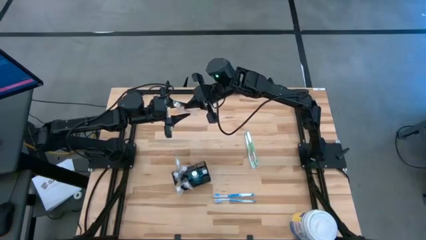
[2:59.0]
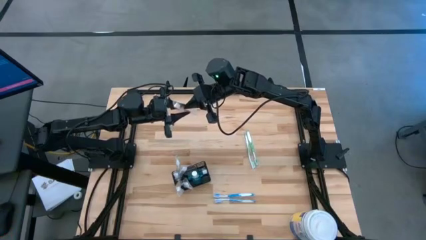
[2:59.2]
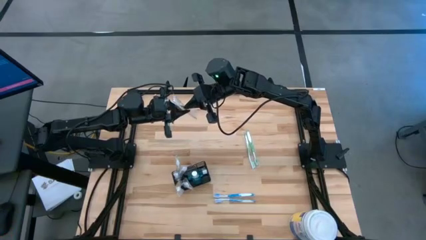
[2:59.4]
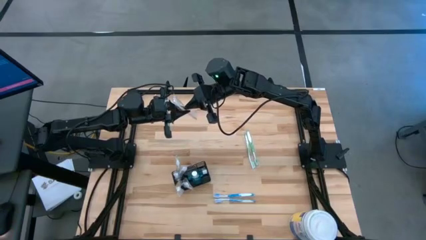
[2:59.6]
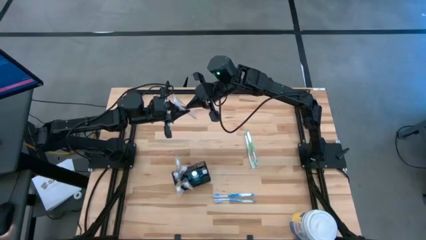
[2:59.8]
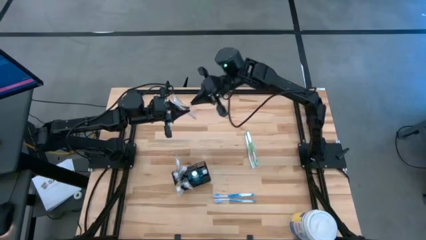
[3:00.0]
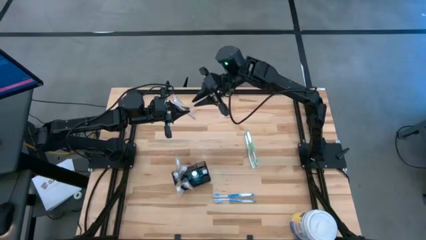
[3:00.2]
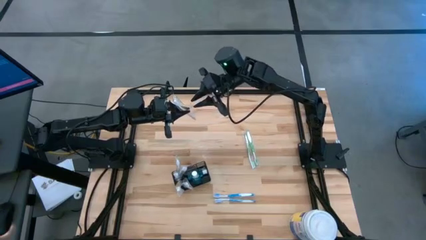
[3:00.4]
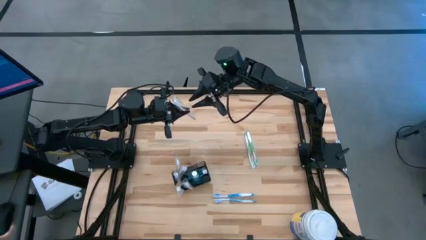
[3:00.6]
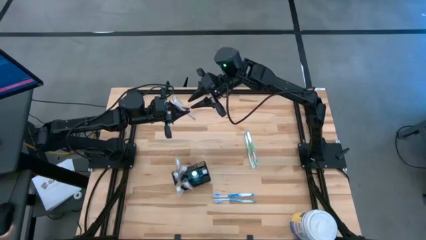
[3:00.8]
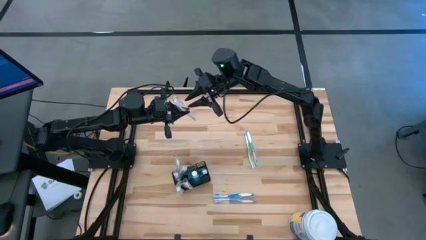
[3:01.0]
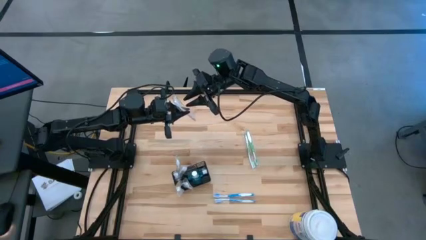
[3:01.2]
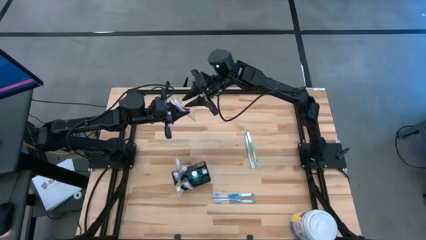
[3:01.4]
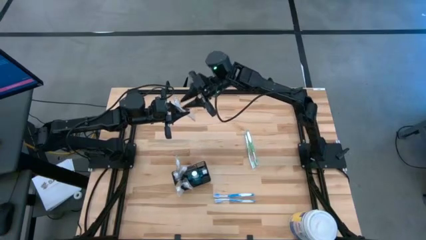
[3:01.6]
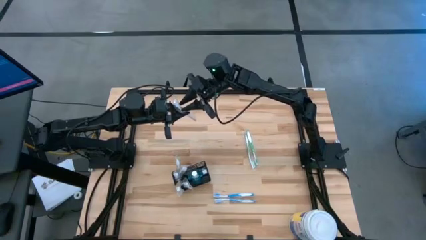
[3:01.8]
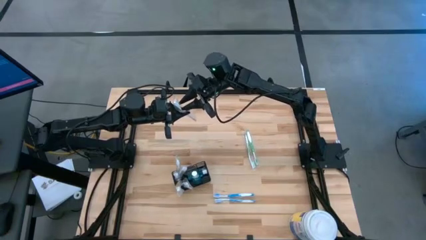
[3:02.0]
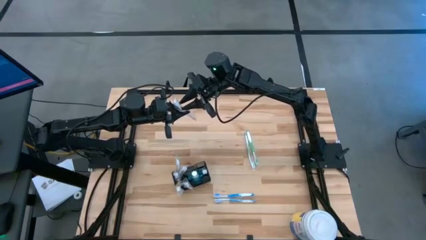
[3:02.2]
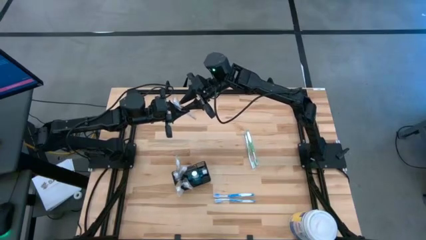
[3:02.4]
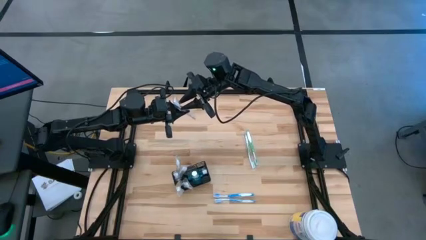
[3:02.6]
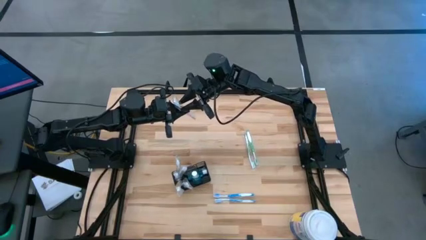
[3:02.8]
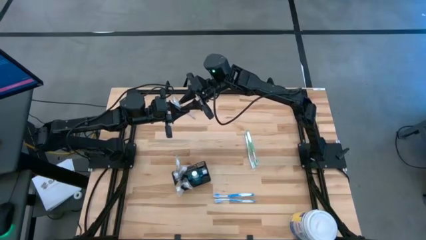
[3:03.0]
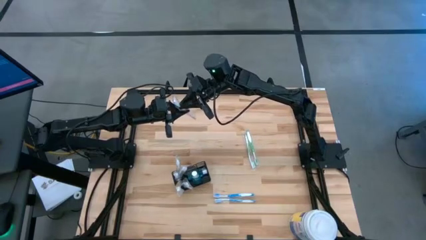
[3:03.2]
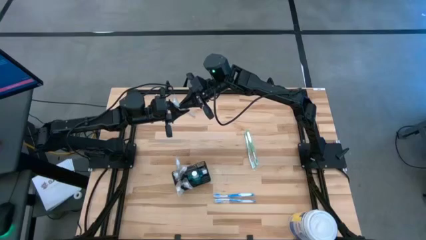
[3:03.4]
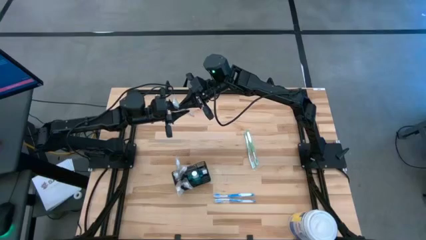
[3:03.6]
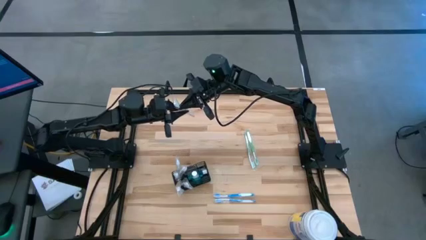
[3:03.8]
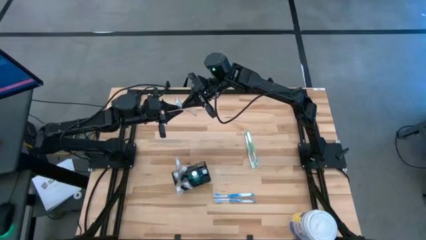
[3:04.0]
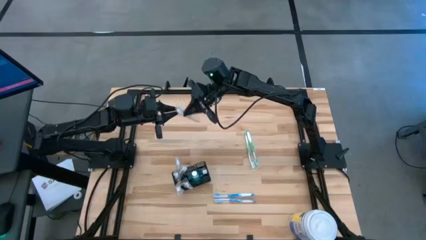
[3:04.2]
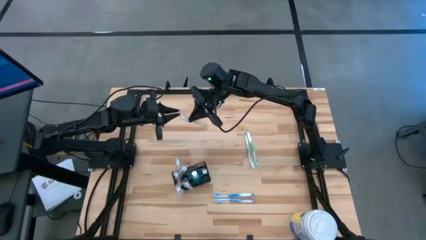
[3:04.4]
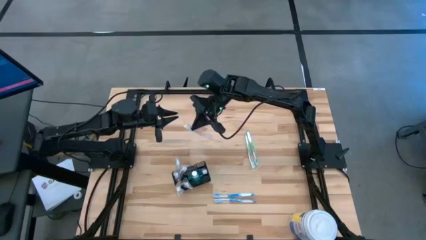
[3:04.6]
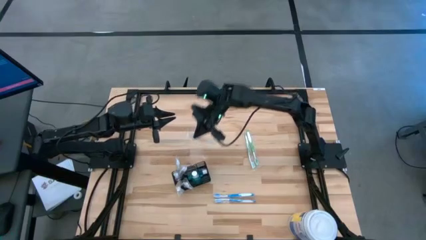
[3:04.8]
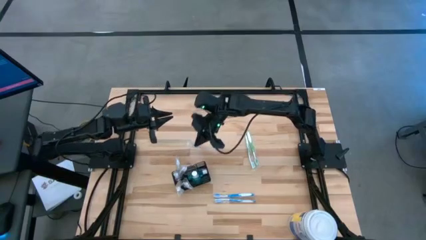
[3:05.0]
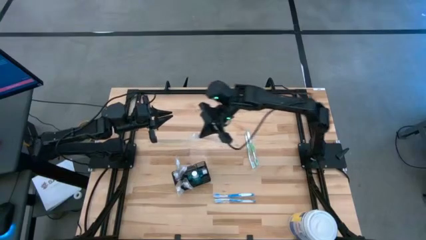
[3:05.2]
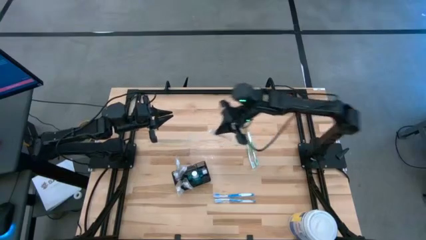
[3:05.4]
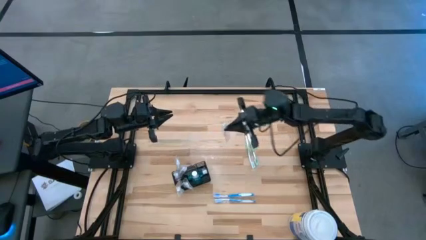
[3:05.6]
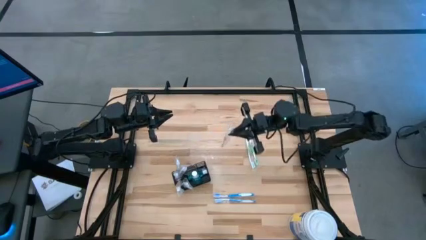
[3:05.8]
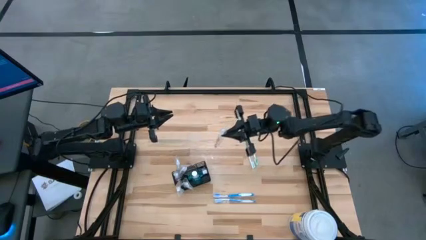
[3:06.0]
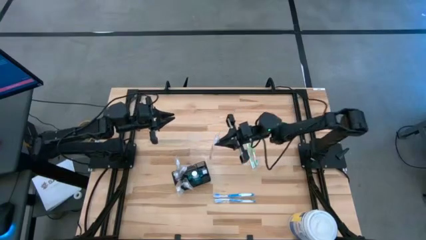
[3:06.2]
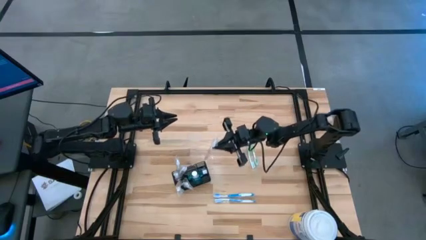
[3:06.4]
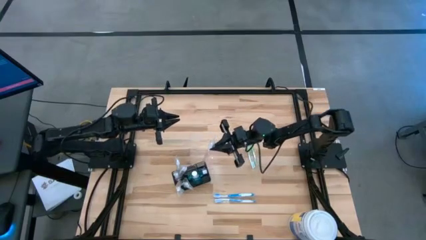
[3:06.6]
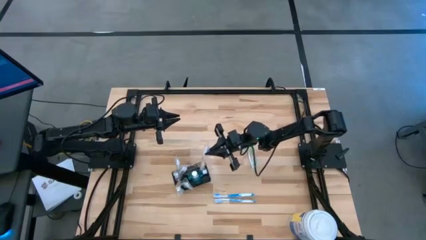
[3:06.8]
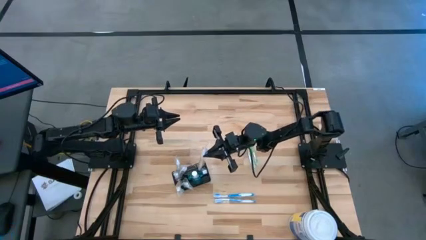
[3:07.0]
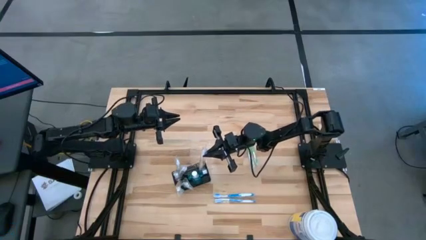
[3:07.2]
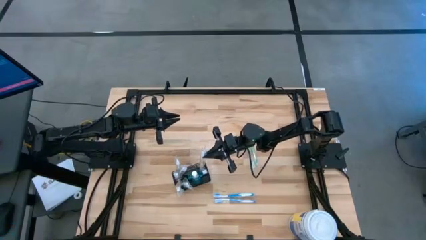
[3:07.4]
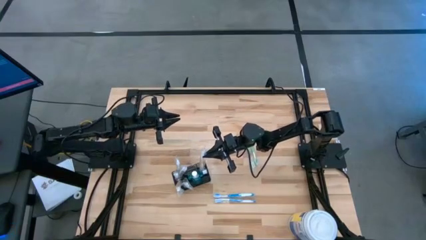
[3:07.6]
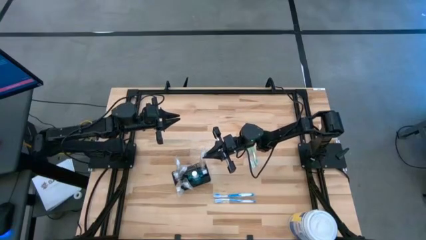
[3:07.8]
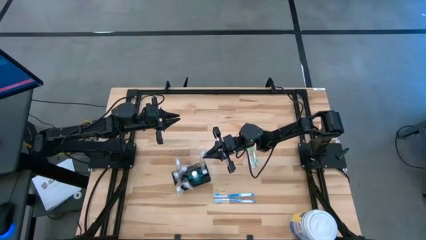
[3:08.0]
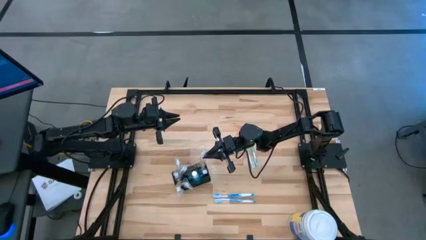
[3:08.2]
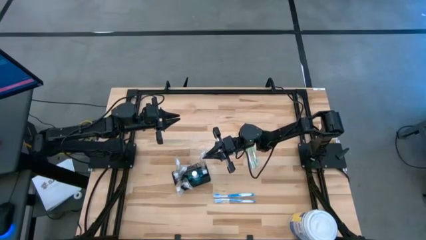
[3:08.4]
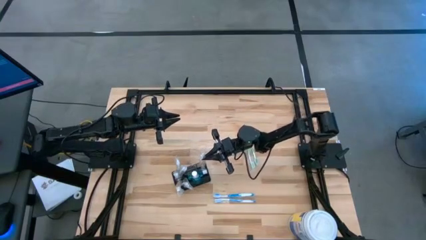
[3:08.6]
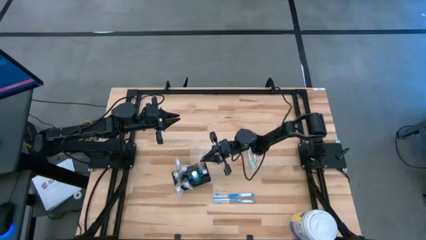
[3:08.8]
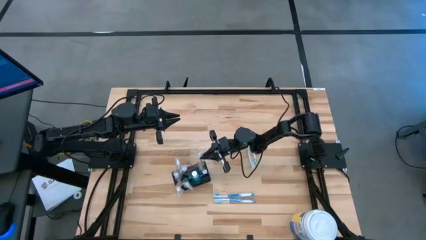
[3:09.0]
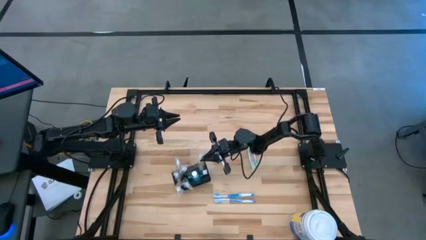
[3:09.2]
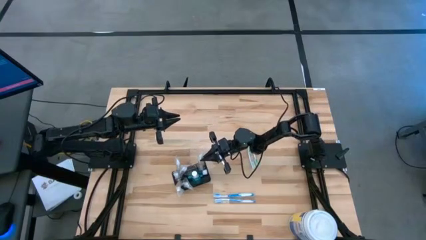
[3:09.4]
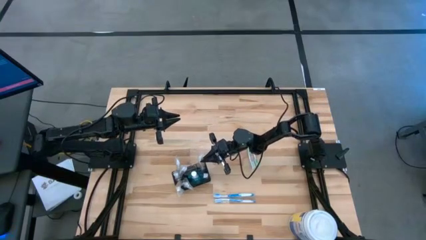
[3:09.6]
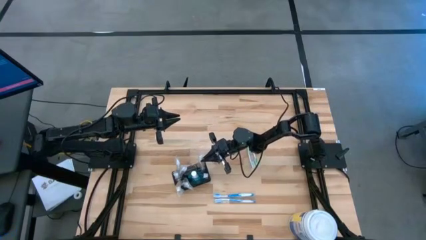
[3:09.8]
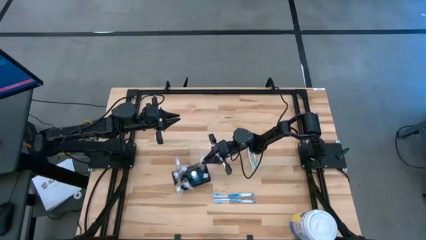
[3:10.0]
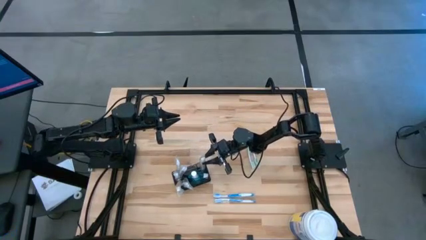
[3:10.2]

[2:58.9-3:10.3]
Task: Pick & Place toothbrushing station
Put the white orange toothbrush into the black toothbrush rack

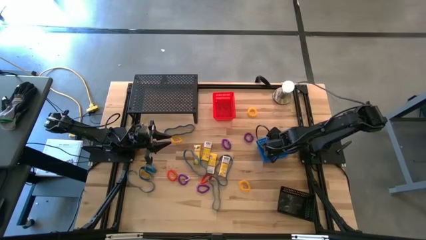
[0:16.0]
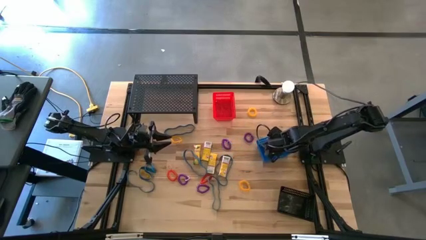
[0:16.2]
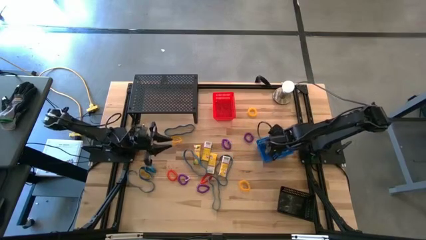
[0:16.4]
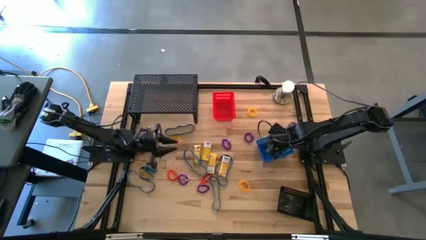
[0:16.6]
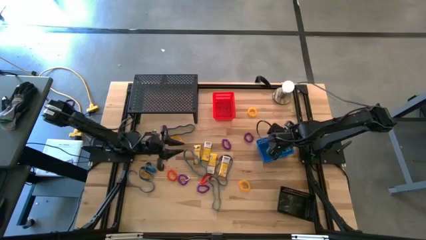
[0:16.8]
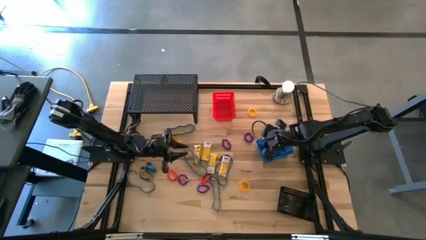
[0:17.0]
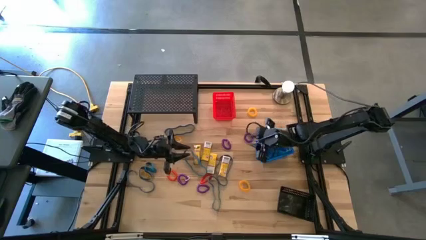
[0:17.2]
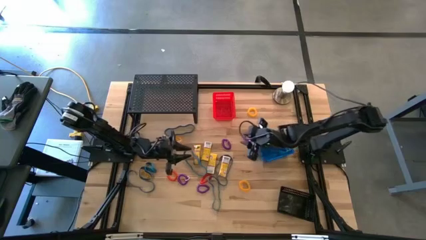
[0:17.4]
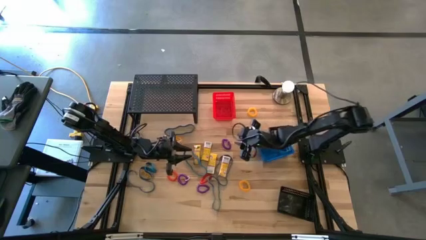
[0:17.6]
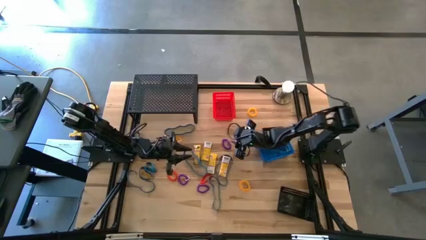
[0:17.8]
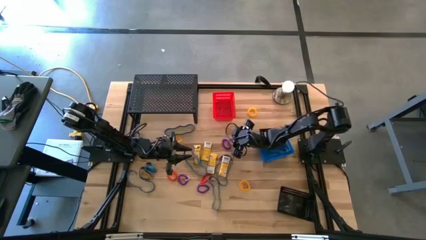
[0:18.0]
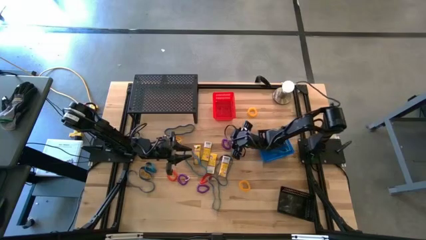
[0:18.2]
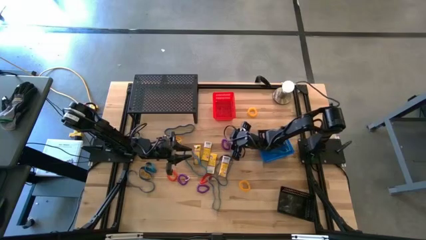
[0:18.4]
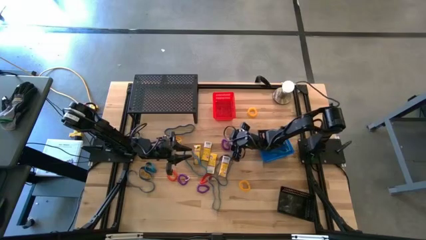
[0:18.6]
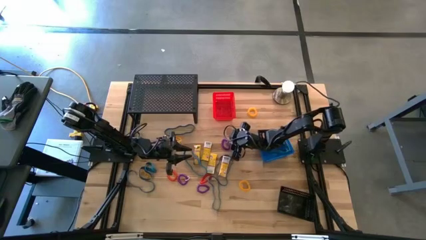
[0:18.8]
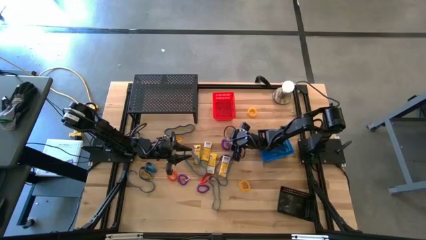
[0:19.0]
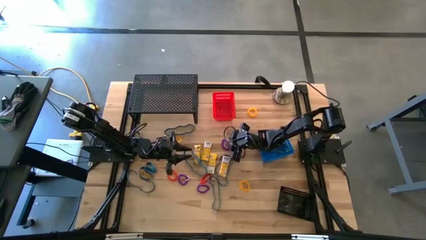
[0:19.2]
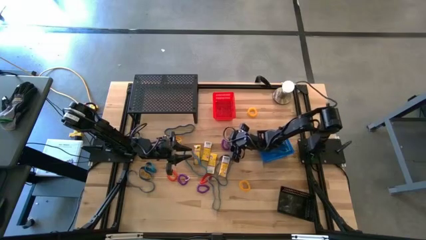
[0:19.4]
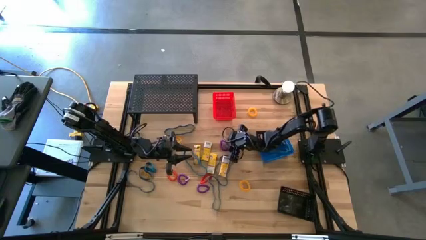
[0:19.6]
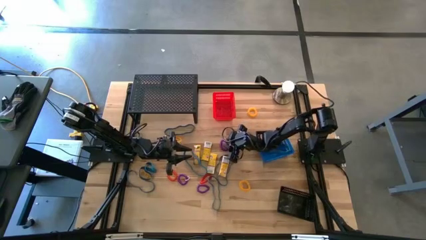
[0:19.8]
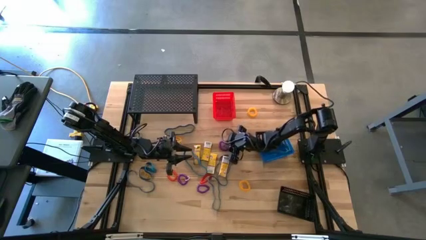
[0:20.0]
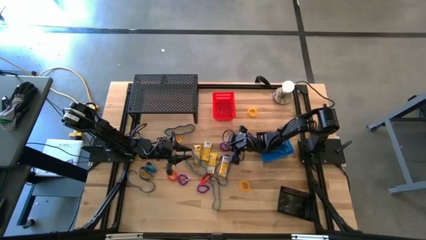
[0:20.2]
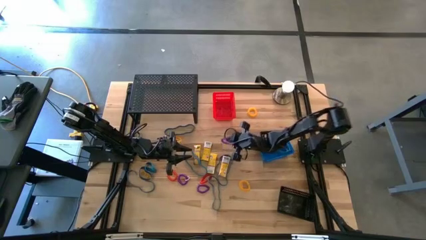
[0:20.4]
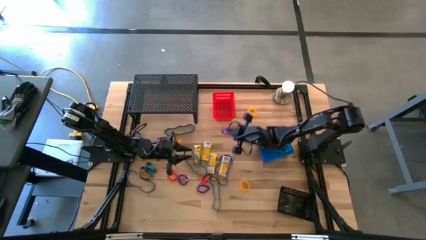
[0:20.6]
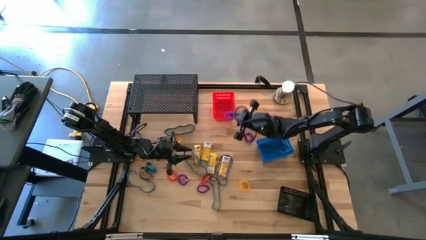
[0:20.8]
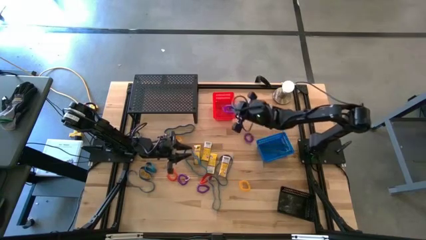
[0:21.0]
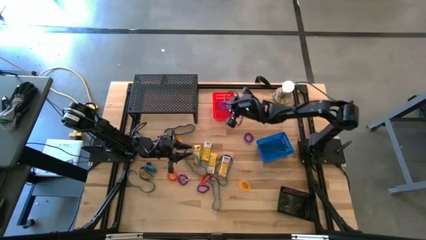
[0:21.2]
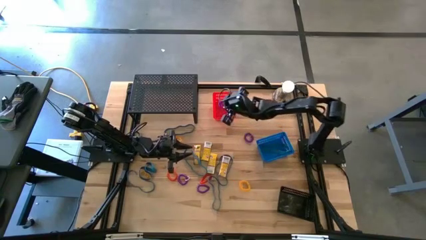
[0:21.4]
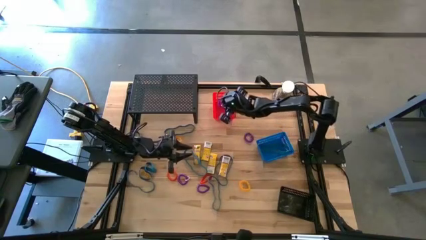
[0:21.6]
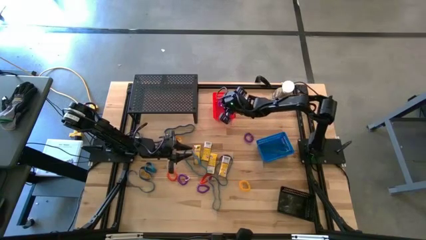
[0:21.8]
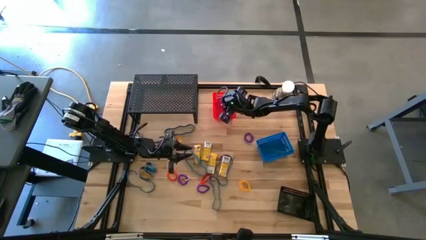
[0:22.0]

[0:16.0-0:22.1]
Task: Pick & Place Office Desk Supplies
Put the violet spring keychain into the red bin
